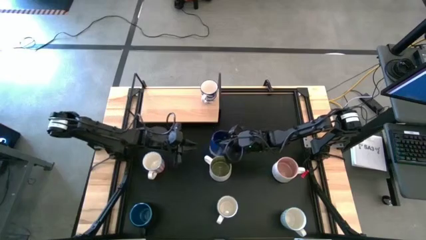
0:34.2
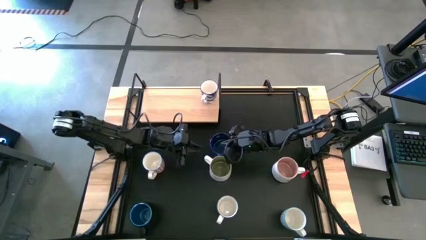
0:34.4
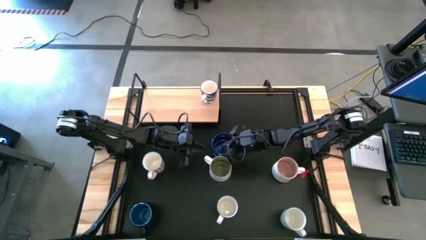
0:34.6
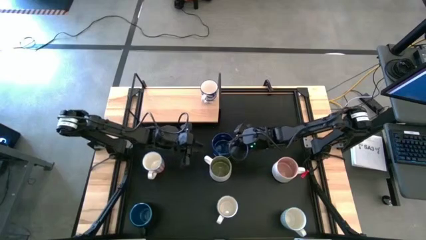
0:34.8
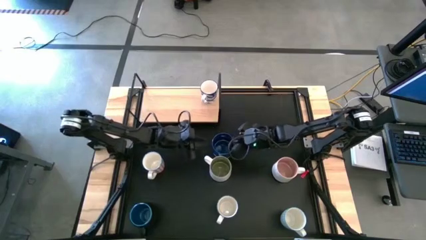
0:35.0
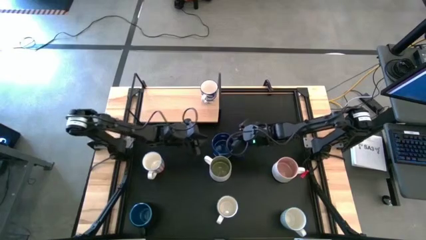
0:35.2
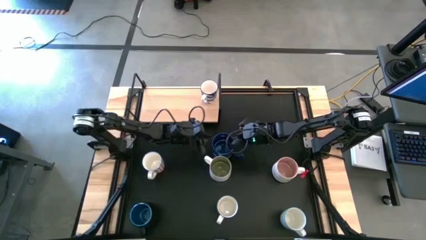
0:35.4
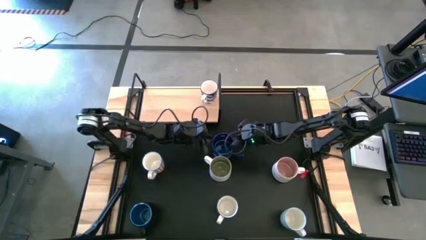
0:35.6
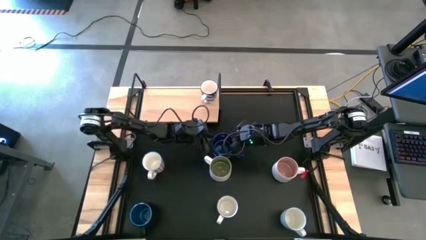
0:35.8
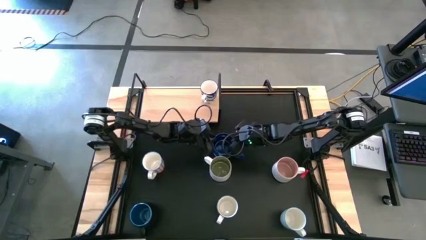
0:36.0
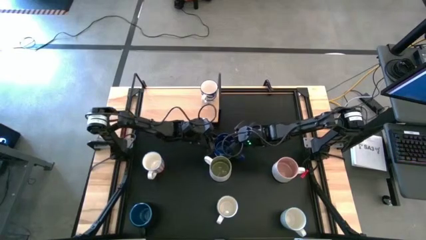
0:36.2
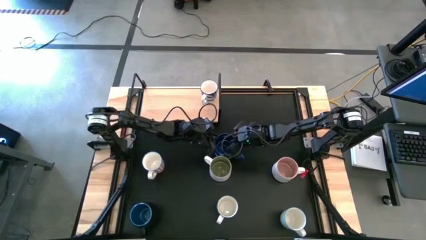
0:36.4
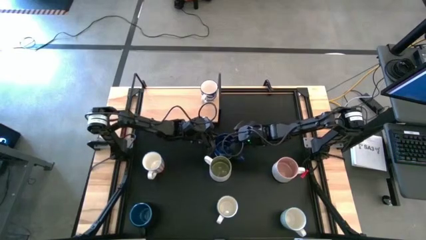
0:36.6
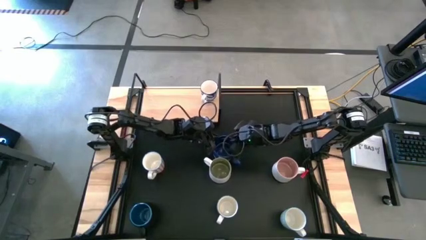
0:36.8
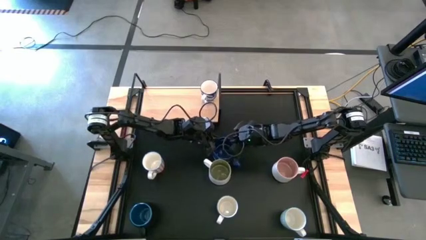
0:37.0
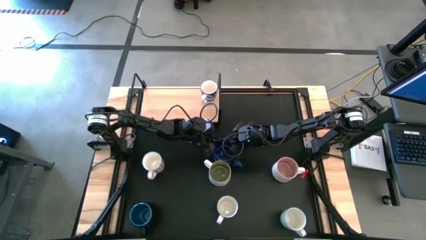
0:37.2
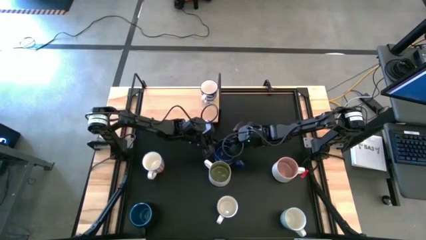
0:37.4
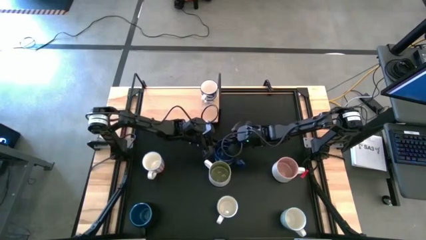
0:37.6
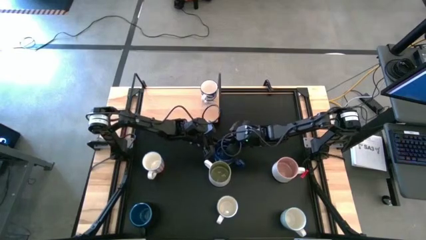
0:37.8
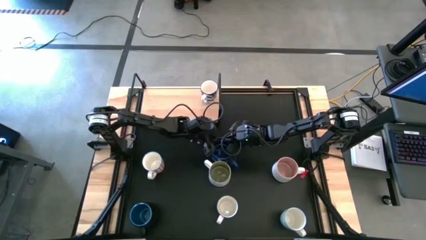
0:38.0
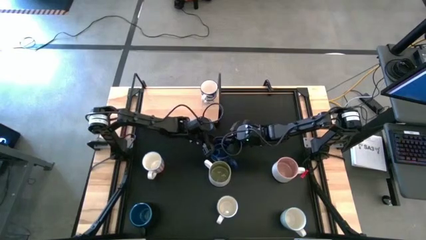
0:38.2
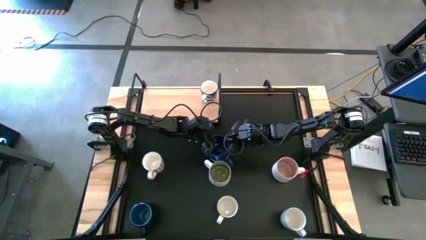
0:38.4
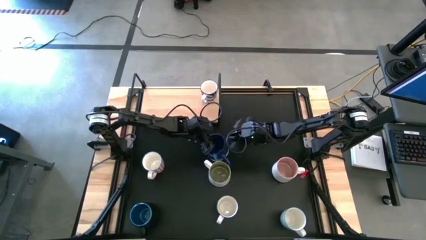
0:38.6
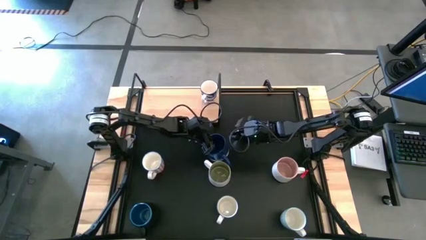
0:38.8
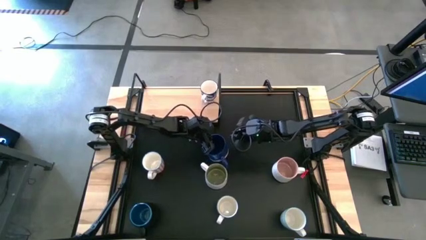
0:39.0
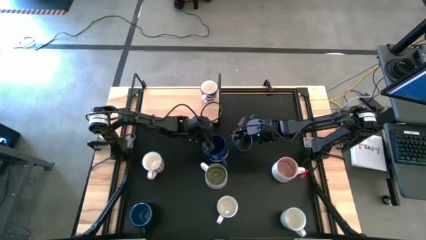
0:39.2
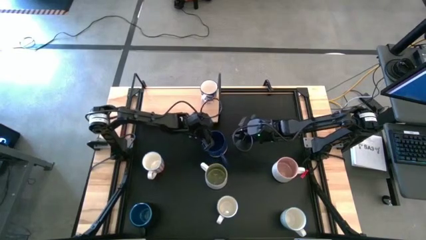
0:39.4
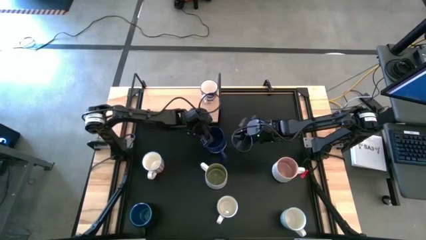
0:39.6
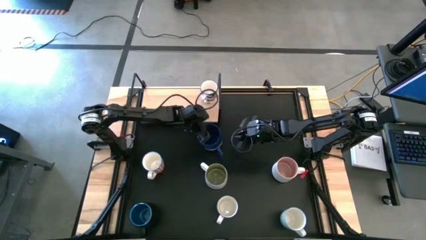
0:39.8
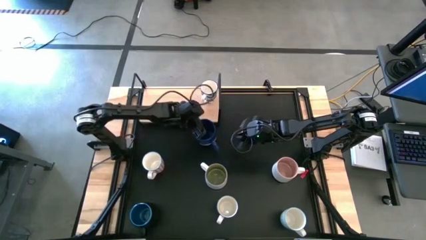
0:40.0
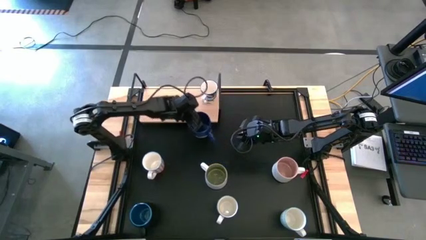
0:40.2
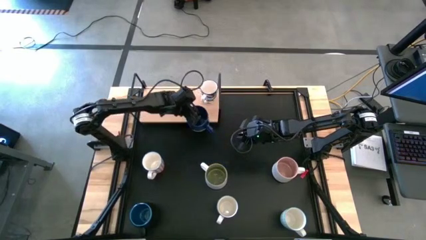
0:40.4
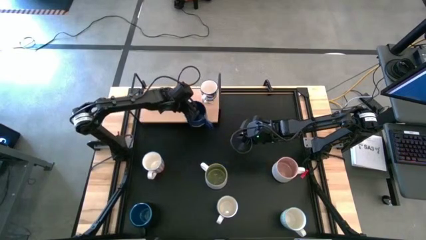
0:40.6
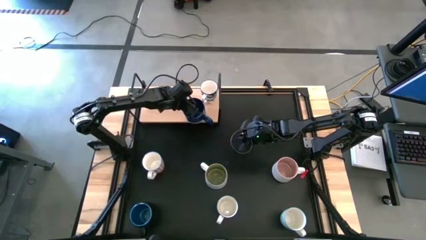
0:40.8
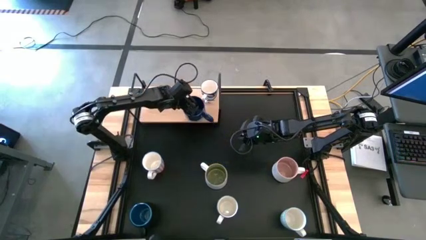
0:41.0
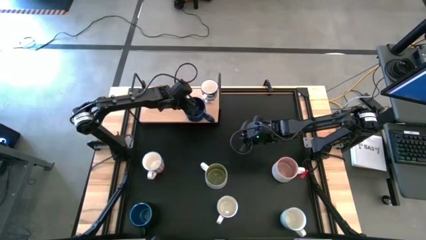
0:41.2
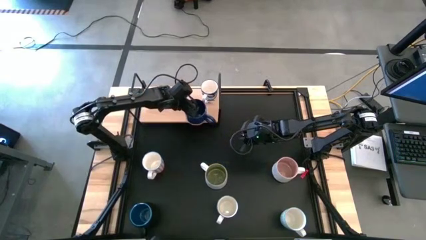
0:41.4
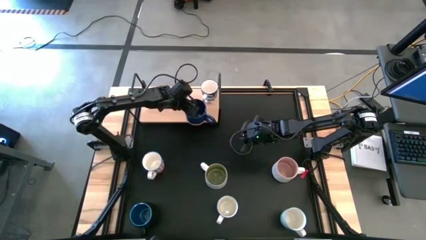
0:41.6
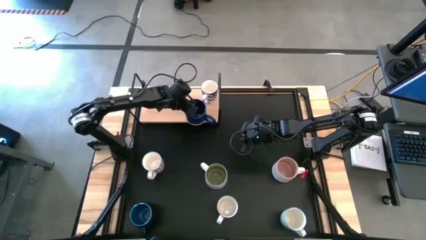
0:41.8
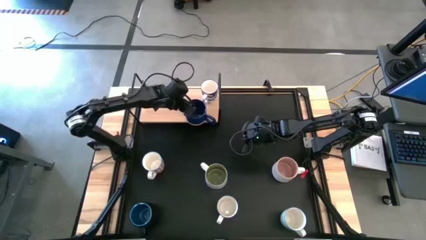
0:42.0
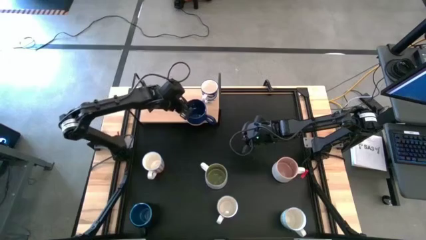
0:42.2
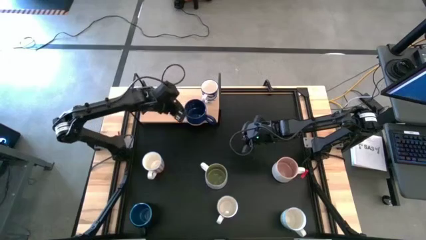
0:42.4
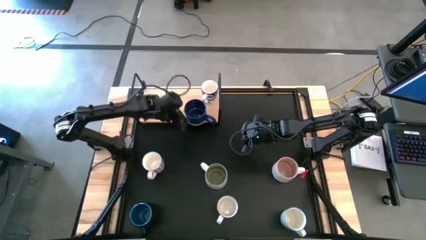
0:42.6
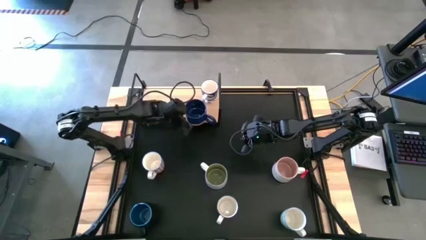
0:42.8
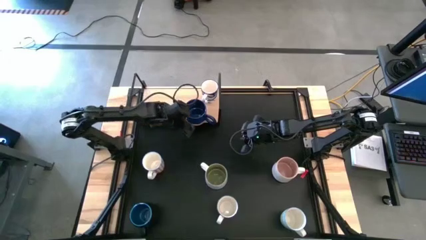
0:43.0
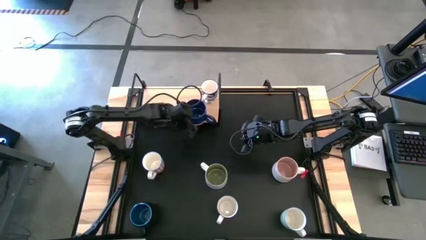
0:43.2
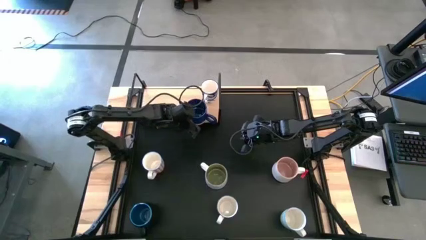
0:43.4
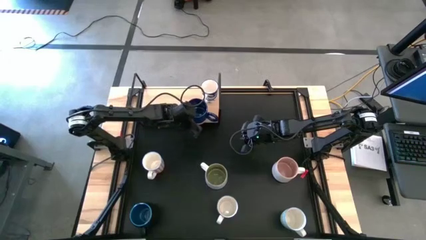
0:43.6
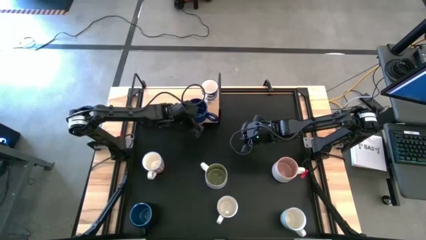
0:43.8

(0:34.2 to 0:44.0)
Task: Place coffee mugs
Put the blue mug on the shelf

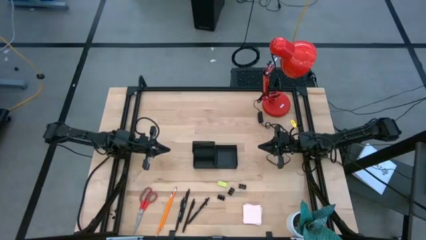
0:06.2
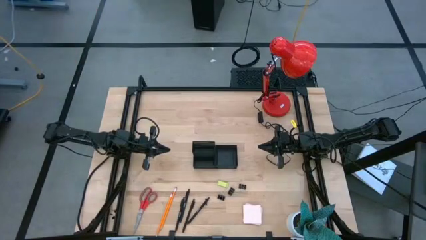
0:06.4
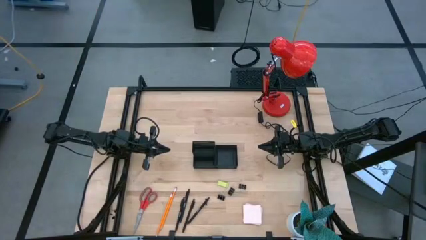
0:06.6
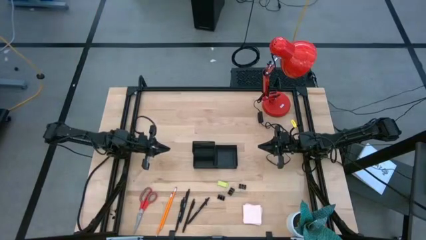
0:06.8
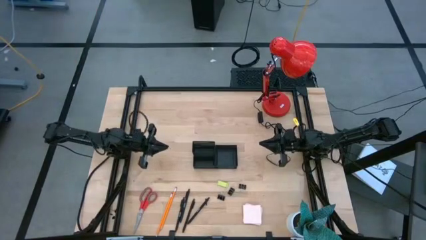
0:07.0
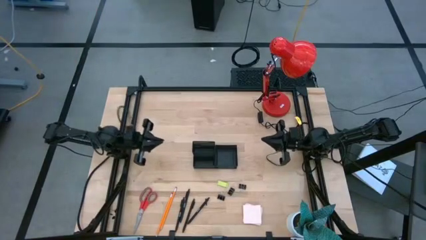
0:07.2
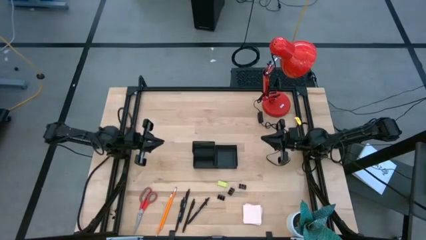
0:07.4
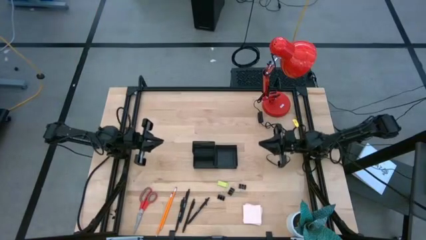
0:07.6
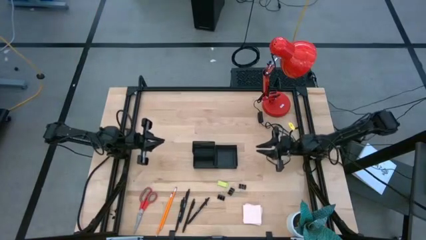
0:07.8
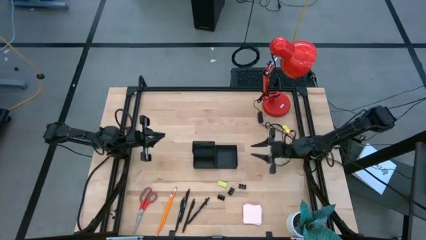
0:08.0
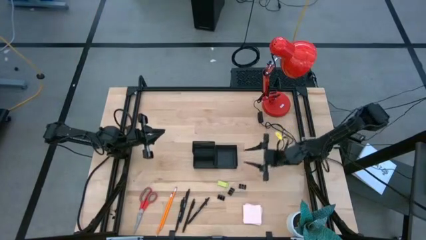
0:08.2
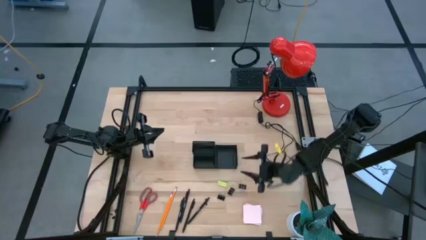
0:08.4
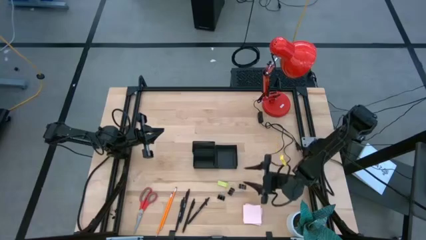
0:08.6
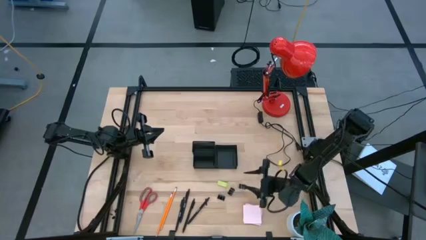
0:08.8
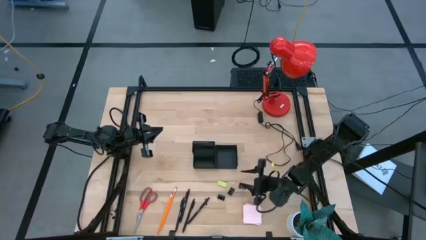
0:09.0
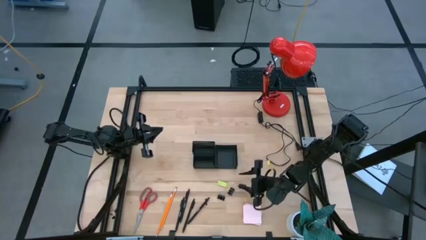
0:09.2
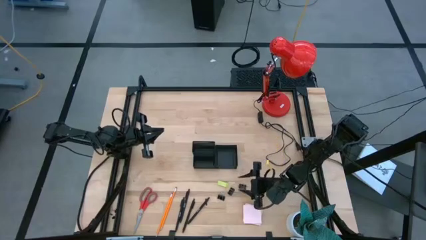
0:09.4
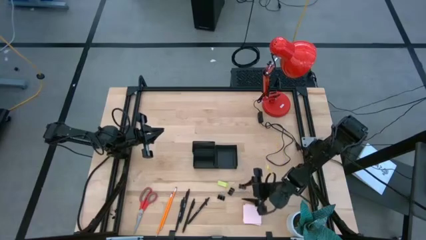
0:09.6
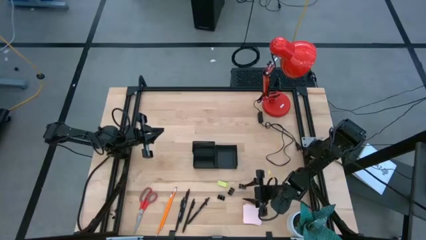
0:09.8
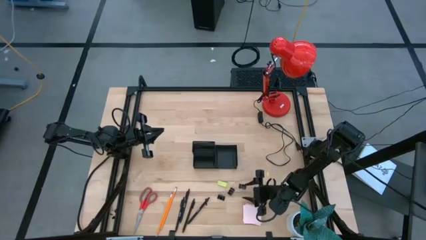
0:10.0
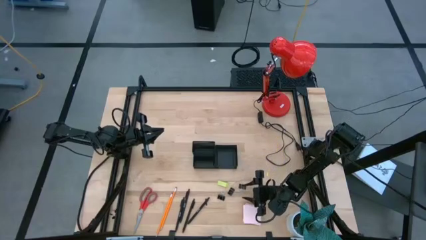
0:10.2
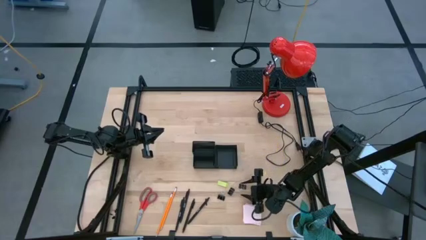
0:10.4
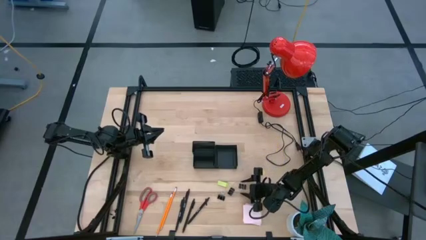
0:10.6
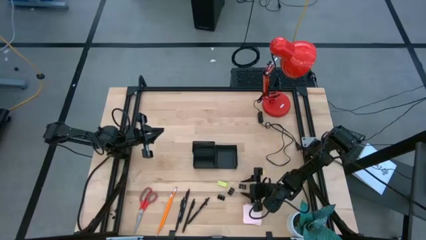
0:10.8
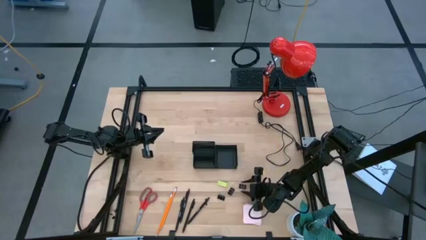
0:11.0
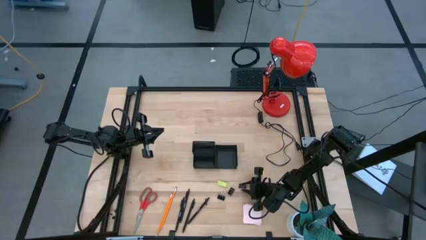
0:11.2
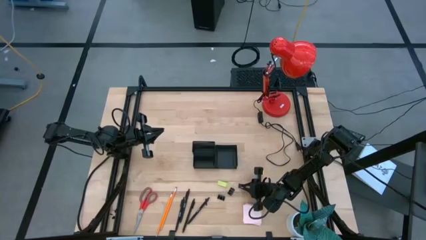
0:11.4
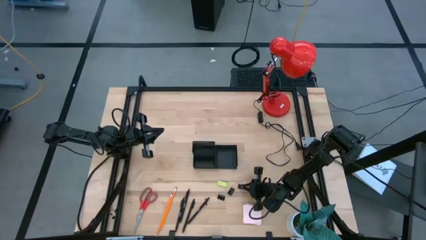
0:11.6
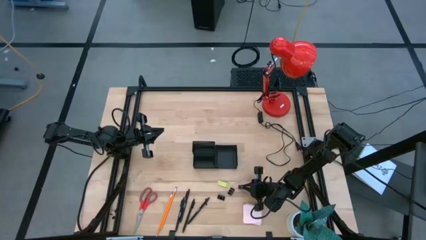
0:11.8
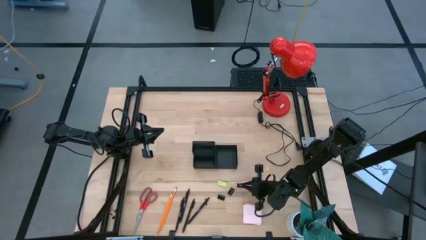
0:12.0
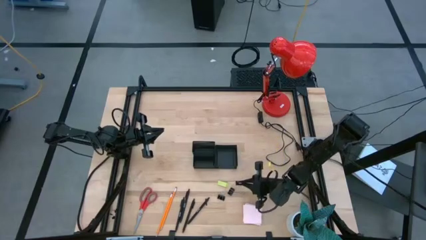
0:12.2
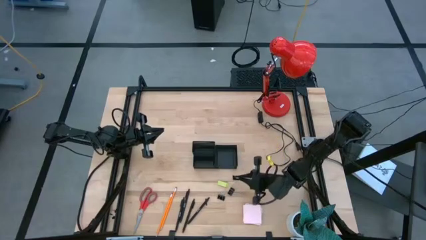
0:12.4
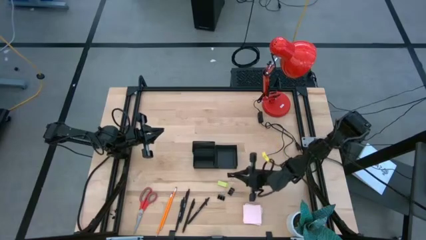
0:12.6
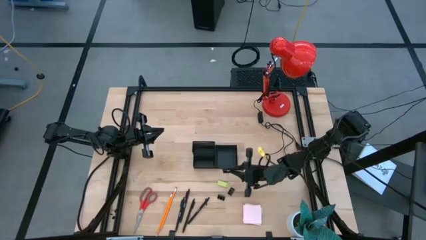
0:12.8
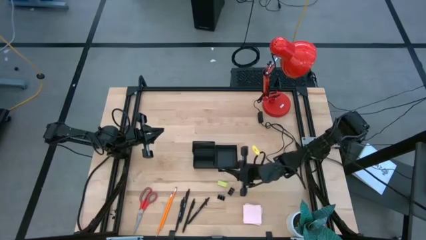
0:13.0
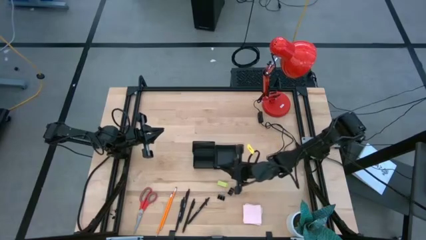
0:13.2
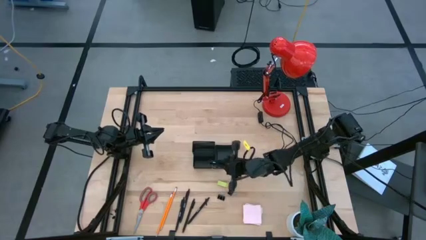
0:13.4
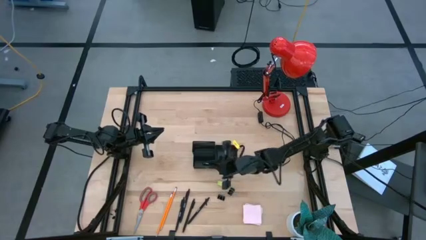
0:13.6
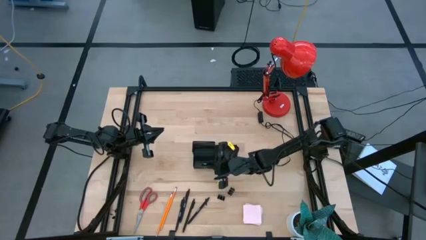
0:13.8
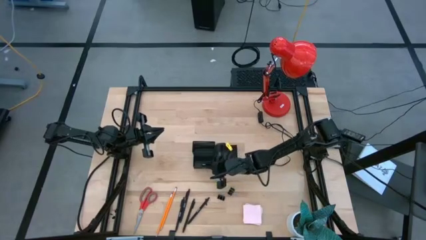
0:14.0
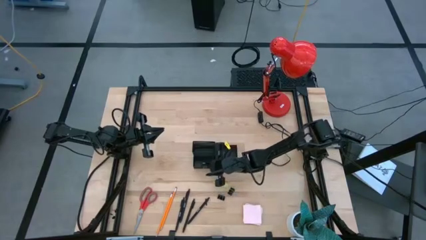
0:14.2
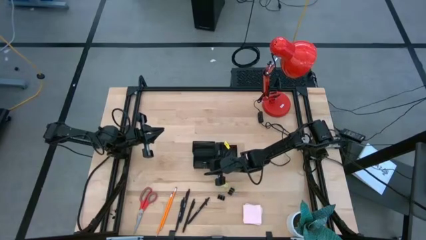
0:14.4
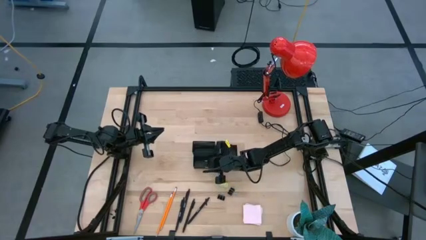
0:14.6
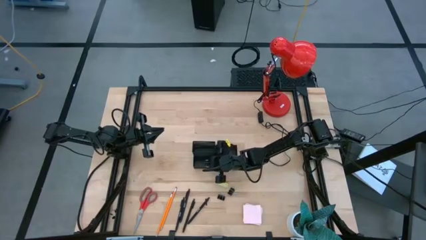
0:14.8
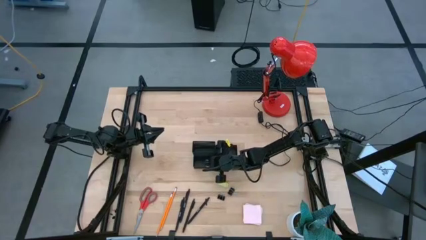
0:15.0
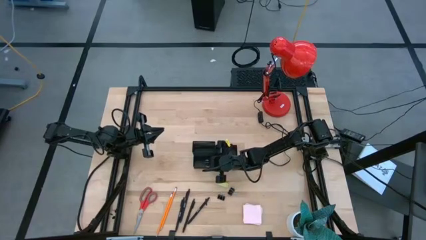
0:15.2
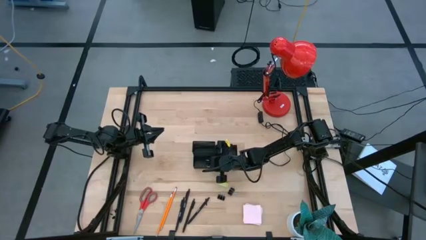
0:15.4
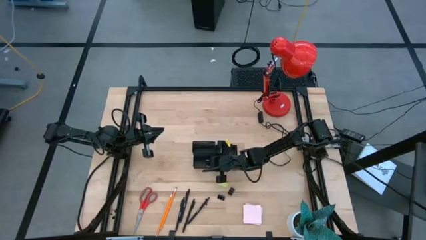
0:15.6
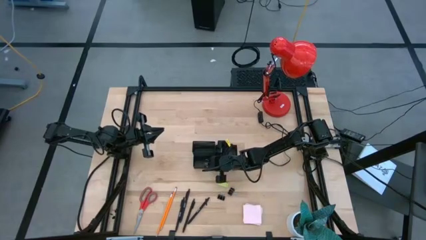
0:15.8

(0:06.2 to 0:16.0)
Task: Pick and place office supplies into organizer
Put the black binder clip into the mesh desk organizer
